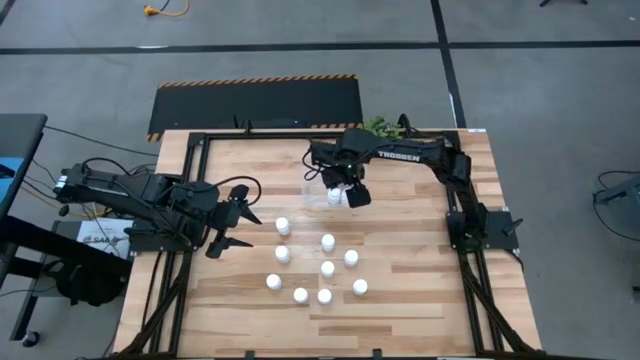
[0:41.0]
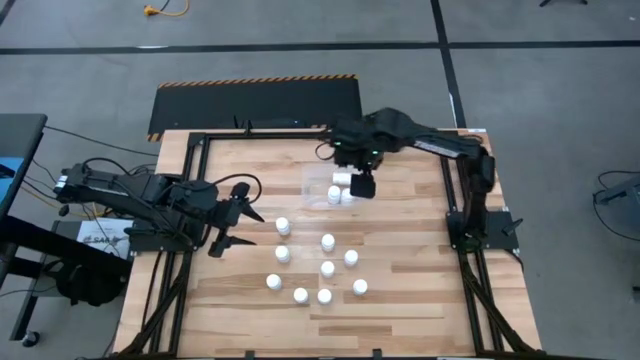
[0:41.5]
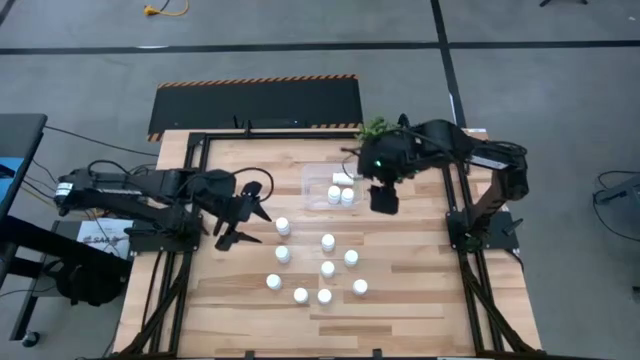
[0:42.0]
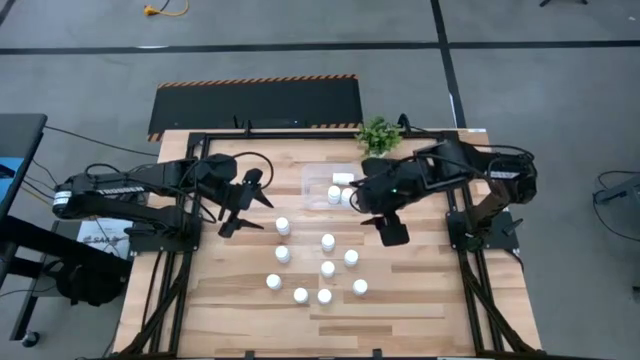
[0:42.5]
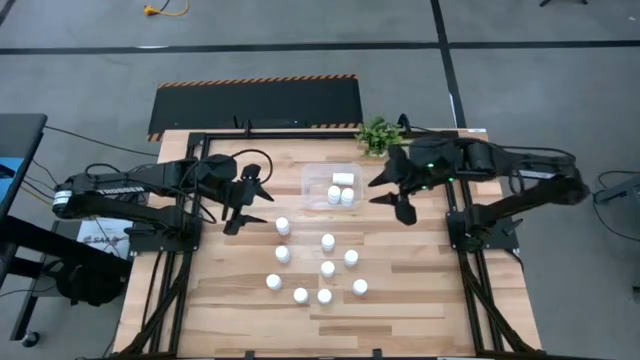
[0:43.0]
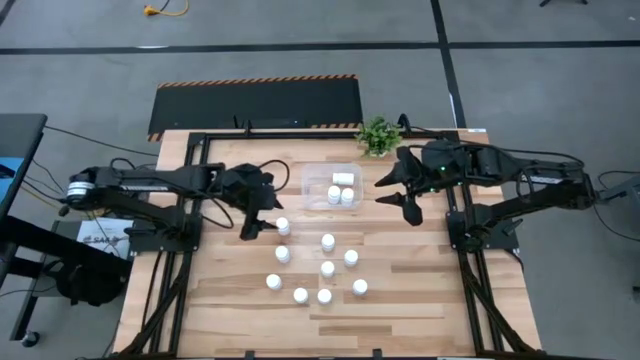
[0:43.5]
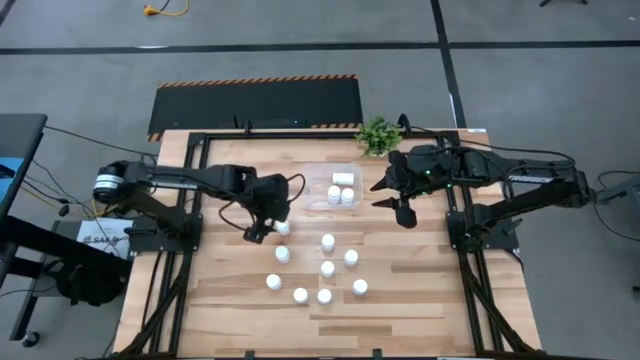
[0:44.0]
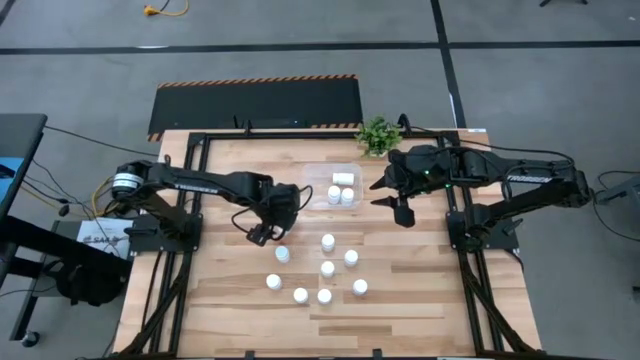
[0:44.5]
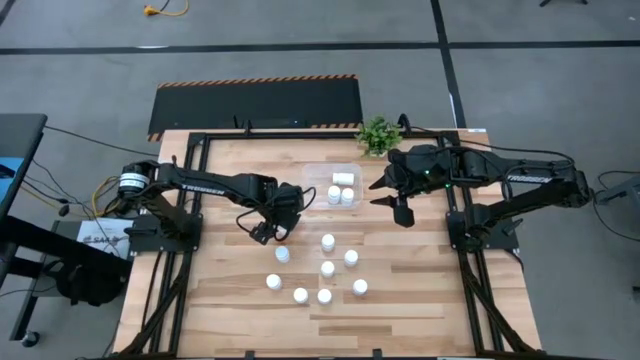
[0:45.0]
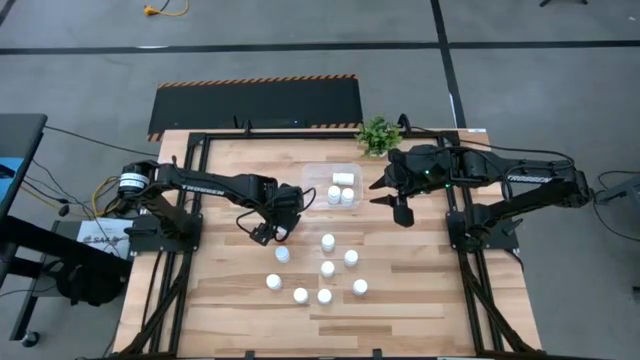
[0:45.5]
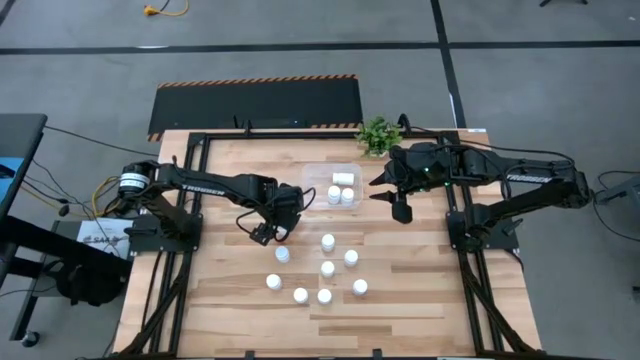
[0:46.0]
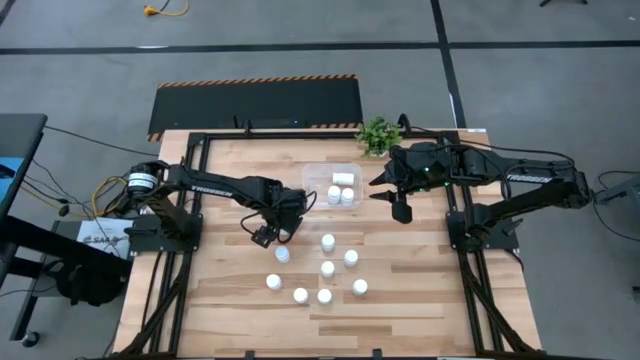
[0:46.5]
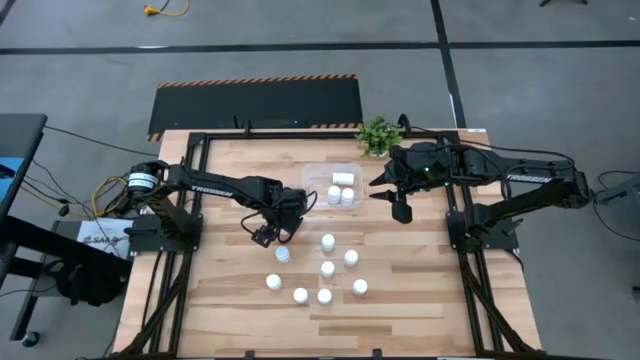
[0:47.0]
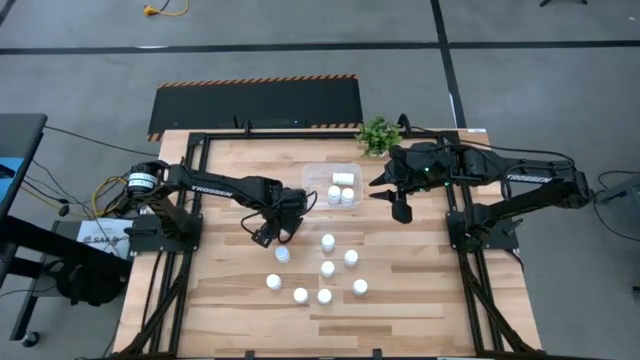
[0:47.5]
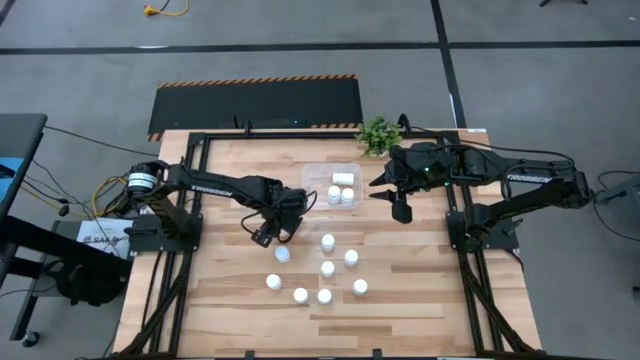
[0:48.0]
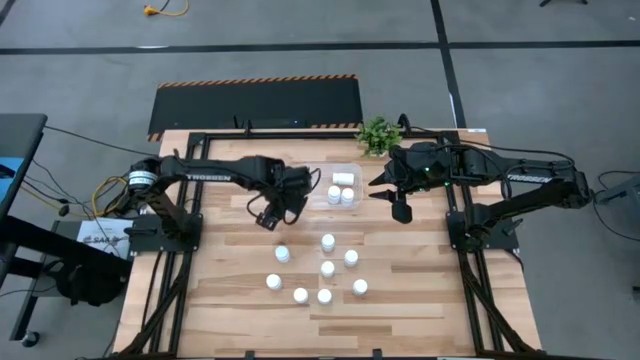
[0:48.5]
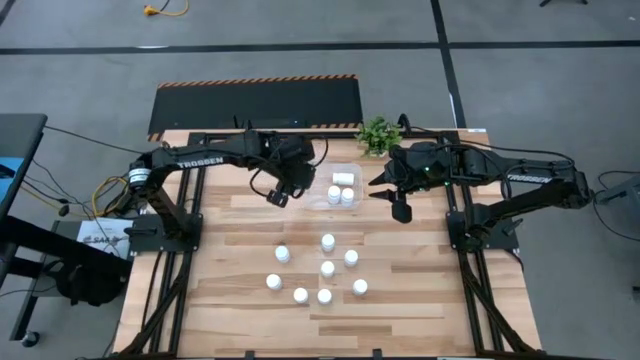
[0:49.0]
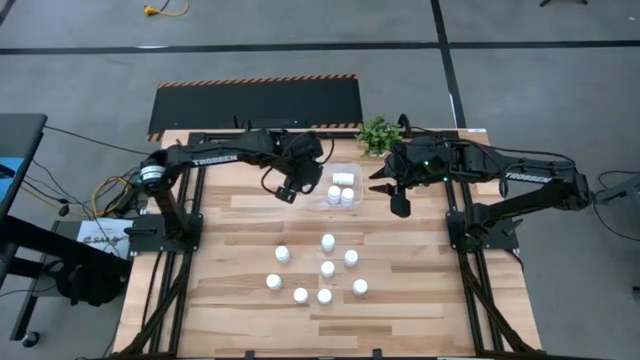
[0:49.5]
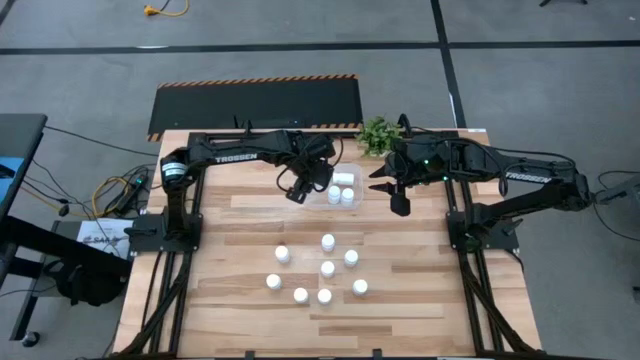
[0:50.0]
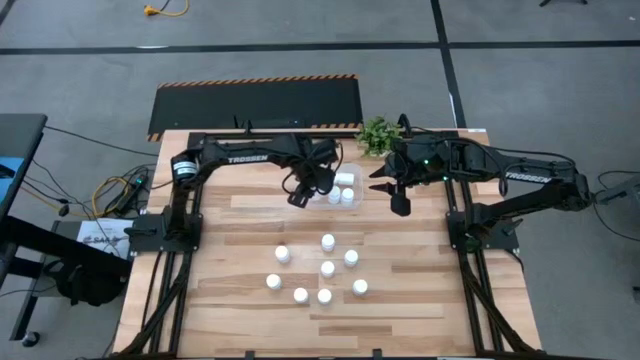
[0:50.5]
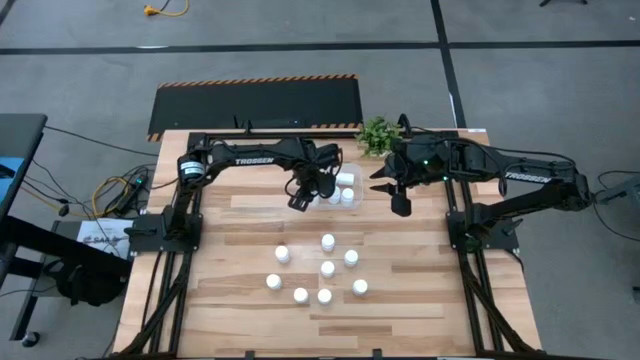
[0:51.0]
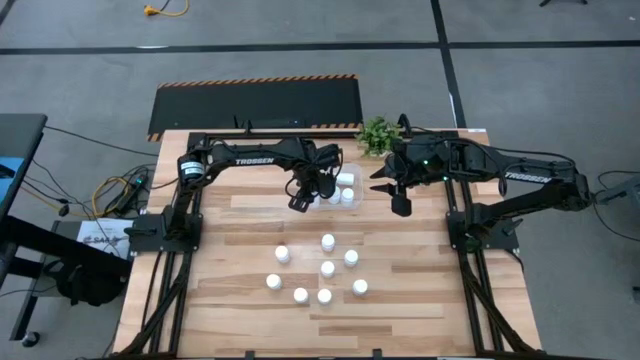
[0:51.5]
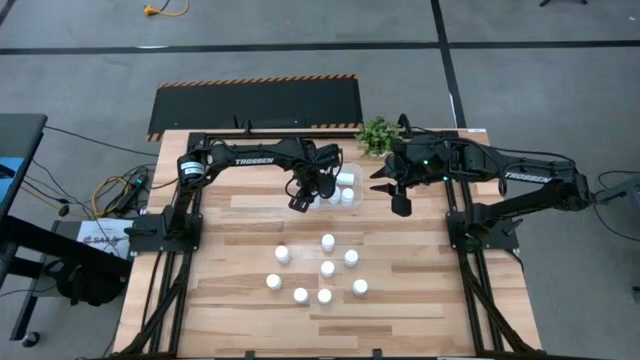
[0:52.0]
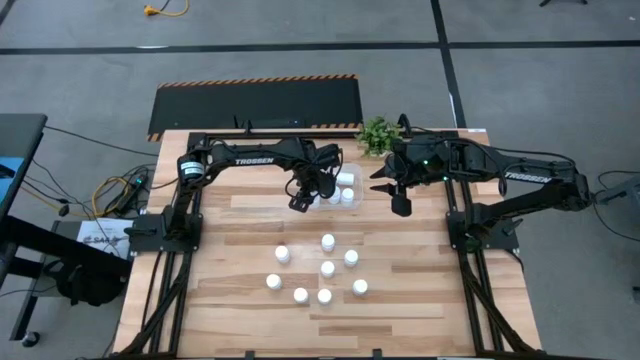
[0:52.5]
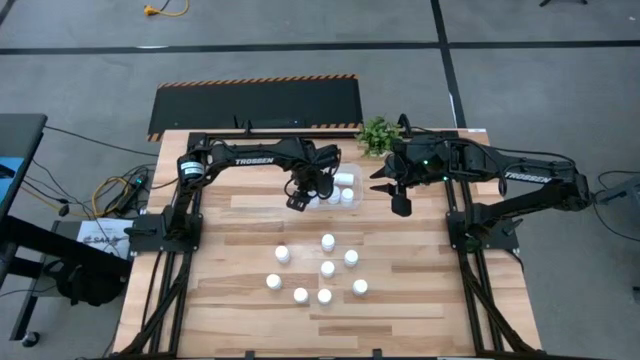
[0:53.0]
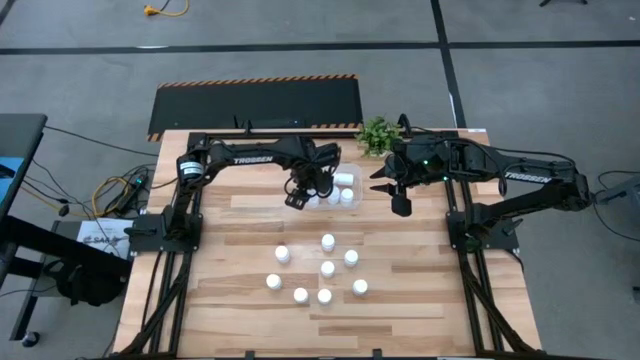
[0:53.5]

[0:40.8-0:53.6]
Task: Pick and place pill bottles into a basket
Put the white medicine bottle into the transparent bin

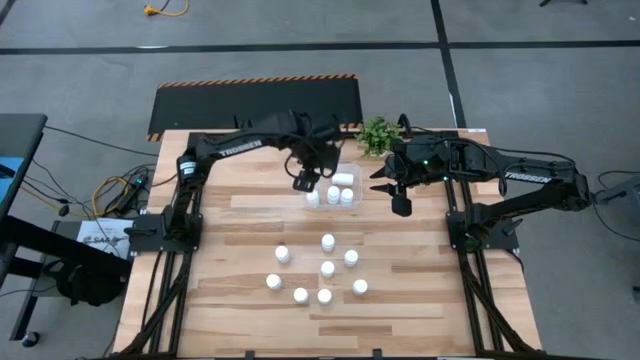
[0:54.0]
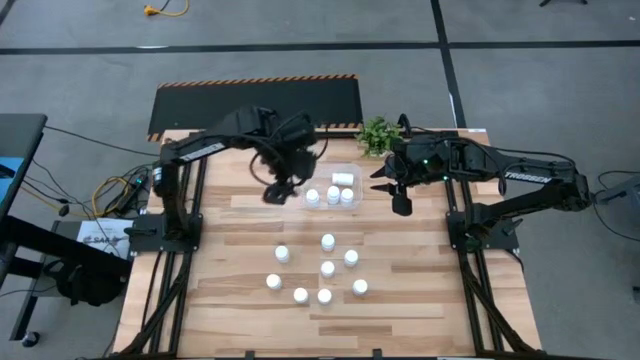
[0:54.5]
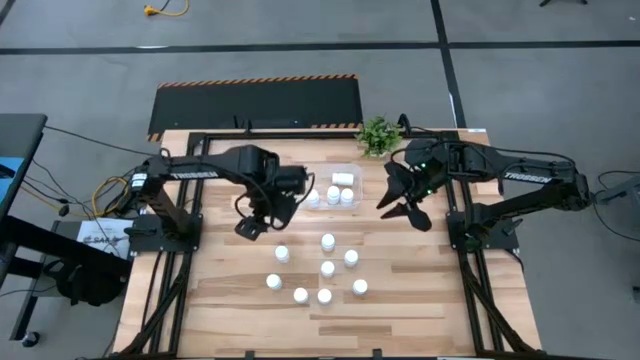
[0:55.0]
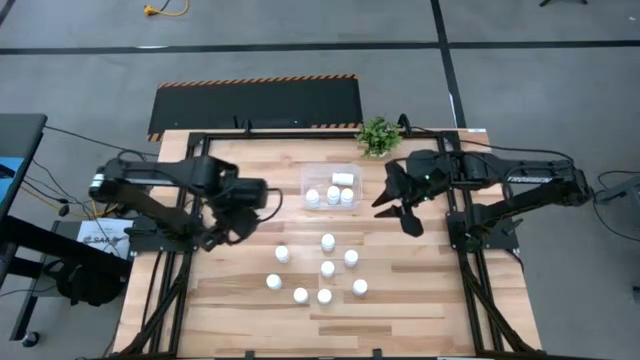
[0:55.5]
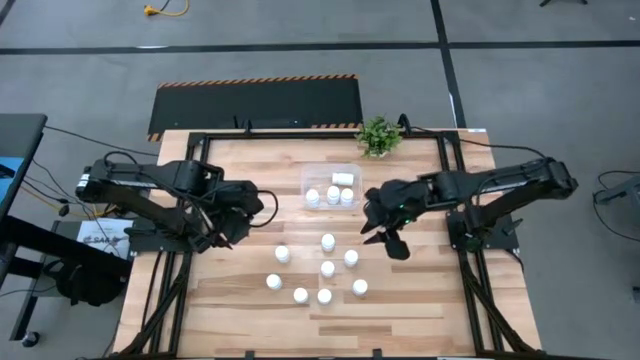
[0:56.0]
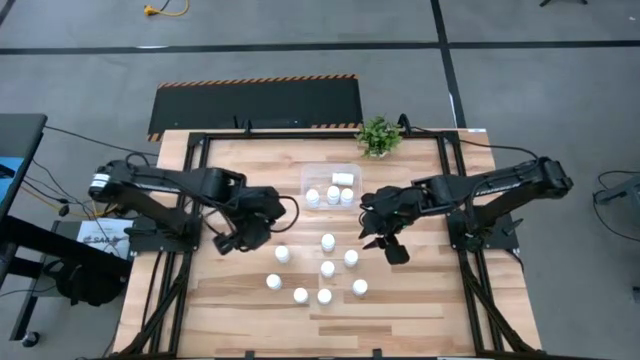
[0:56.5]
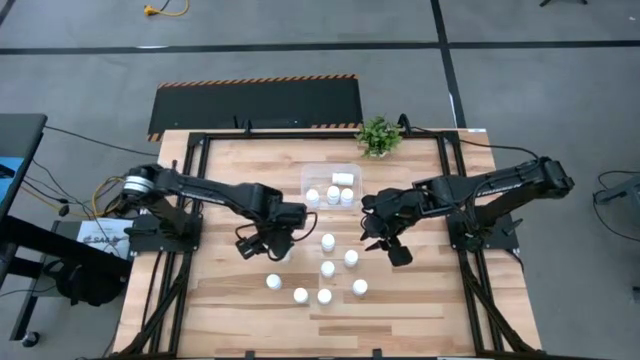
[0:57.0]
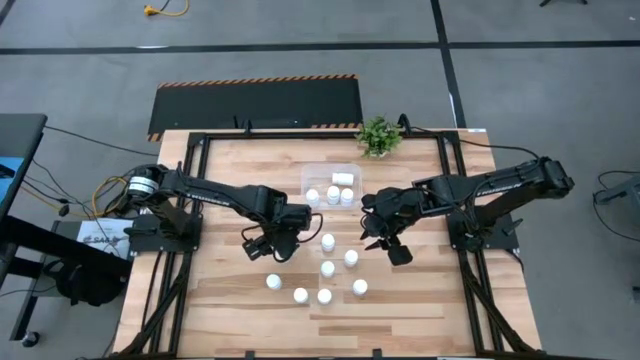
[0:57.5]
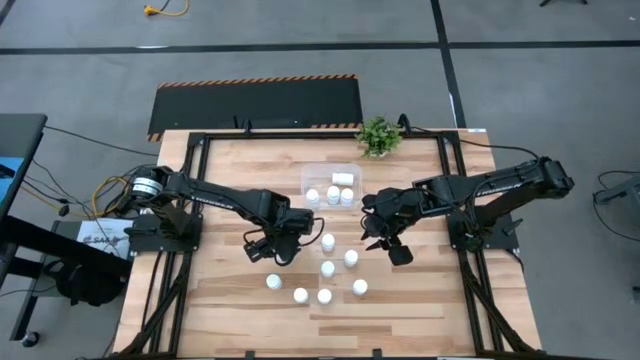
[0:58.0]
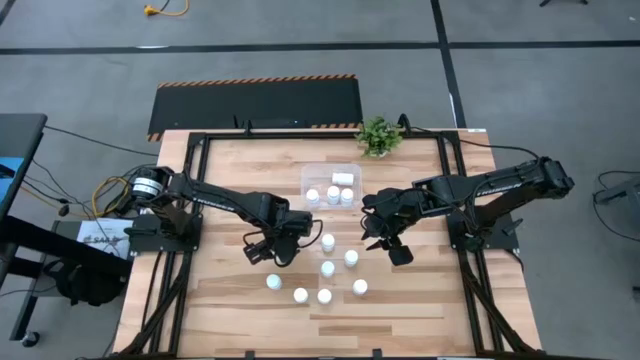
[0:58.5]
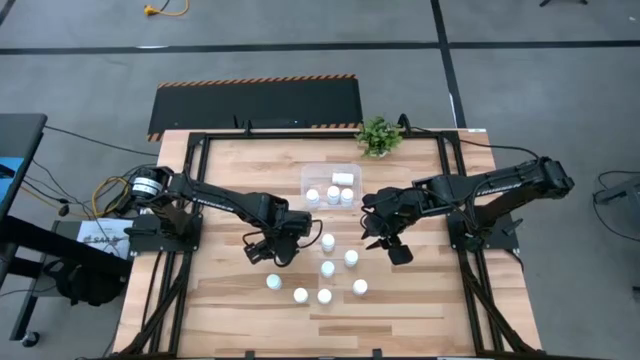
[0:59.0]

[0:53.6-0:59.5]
Put the white medicine bottle into the transparent bin

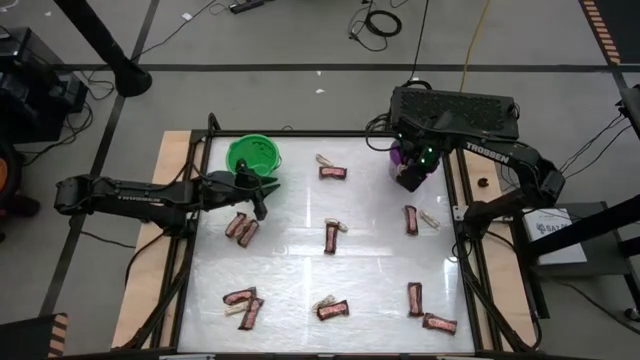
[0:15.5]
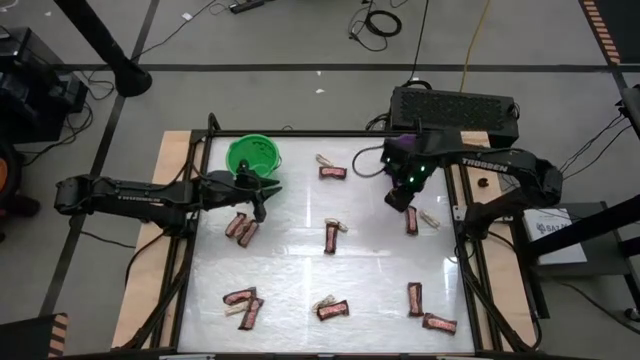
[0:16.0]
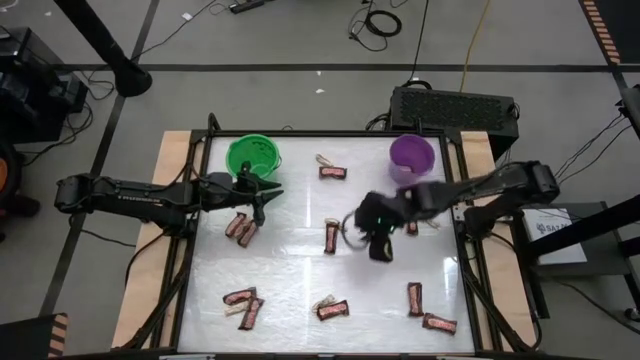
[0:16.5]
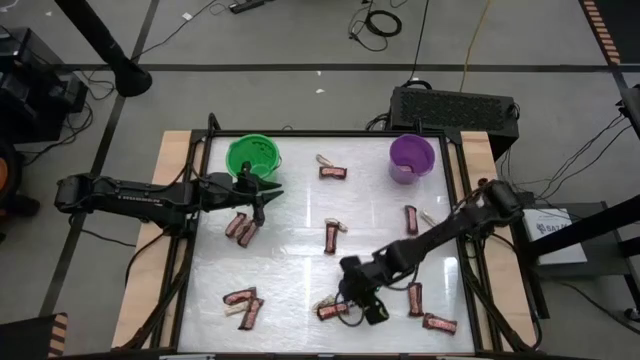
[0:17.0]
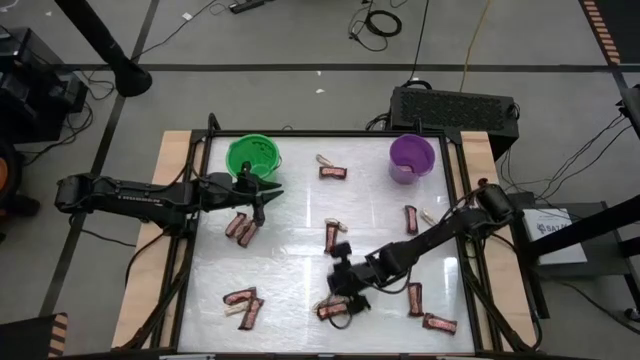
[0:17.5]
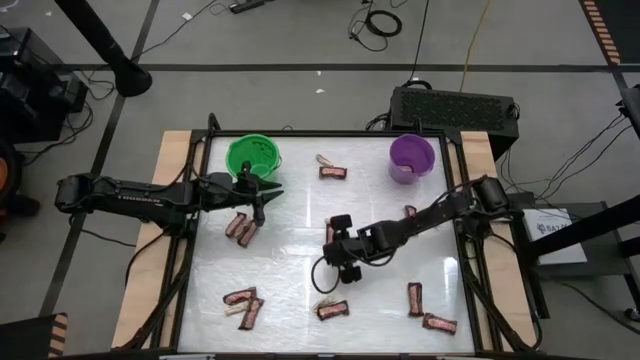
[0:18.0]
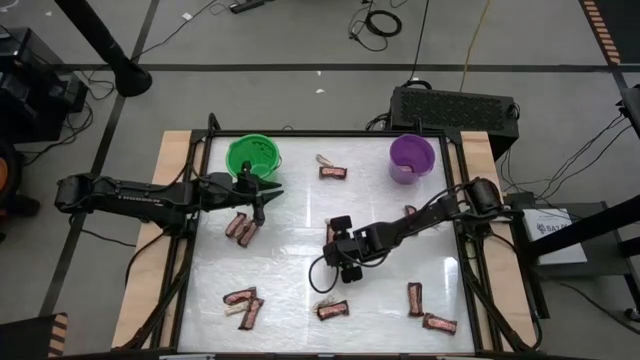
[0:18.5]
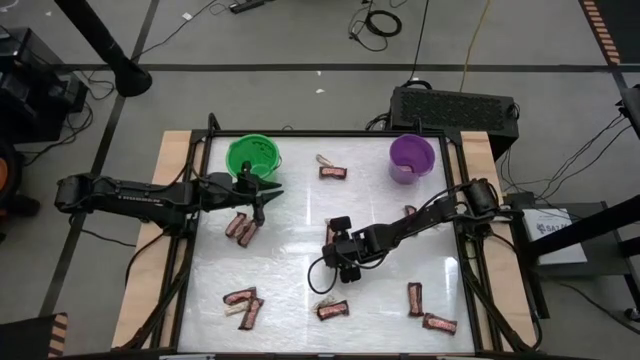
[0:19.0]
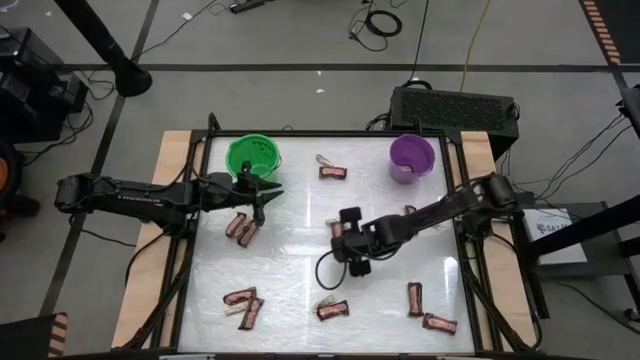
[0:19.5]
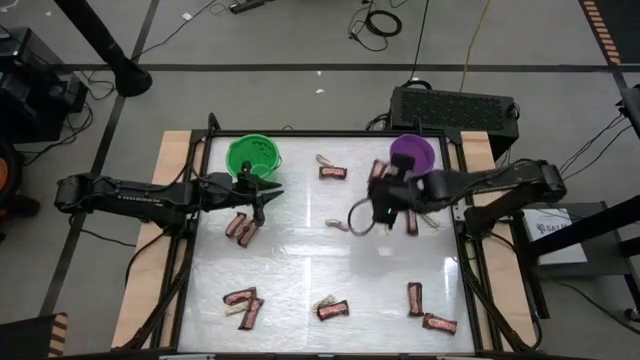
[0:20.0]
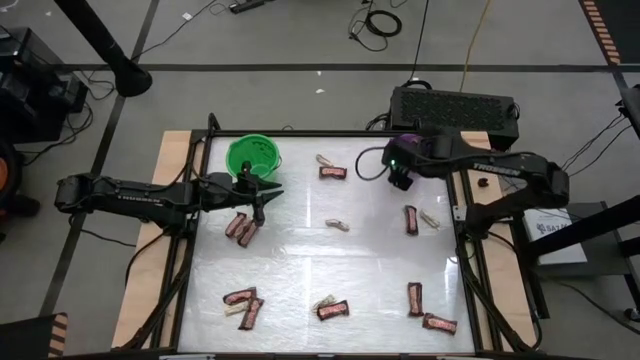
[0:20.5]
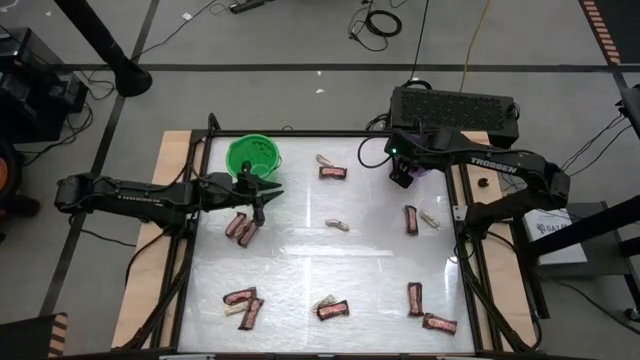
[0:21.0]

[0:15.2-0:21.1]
Task: Sort candy by brand, put in halloween buckets
Put the brown chocolate bar into the purple bucket
